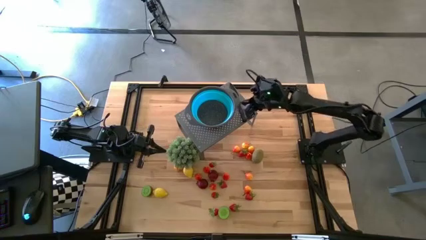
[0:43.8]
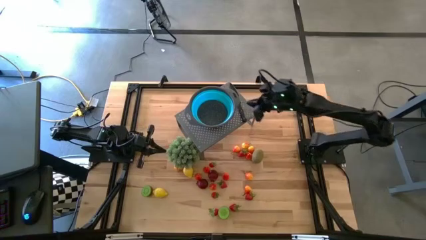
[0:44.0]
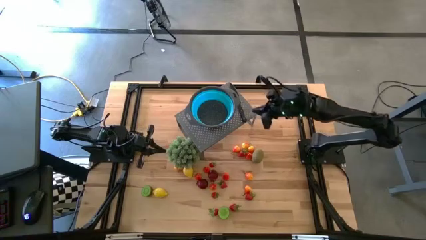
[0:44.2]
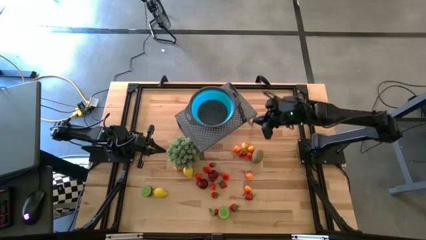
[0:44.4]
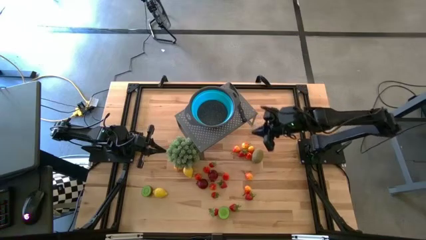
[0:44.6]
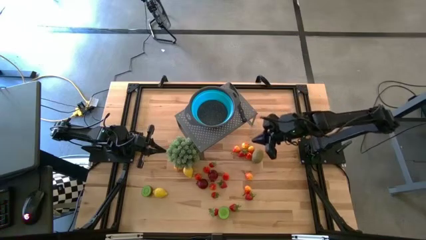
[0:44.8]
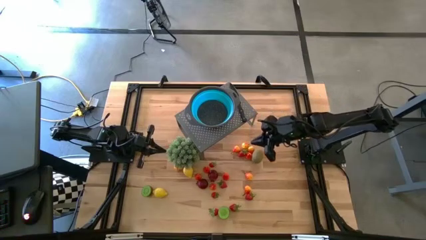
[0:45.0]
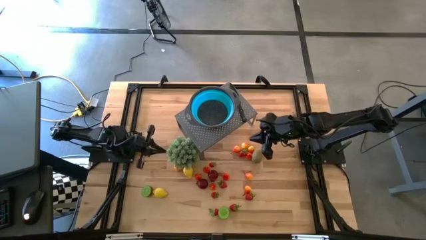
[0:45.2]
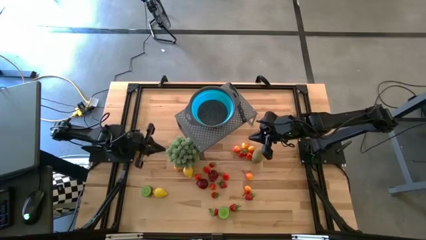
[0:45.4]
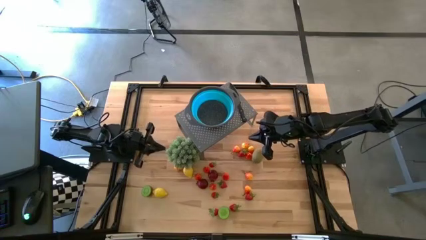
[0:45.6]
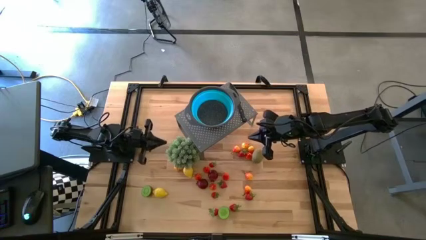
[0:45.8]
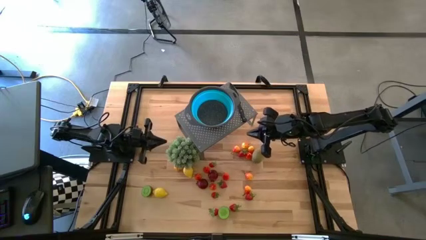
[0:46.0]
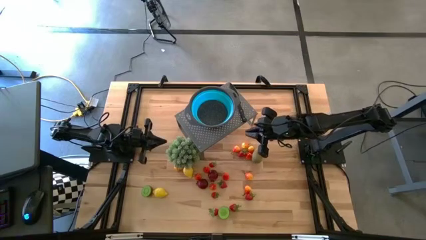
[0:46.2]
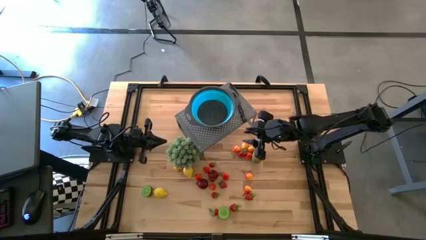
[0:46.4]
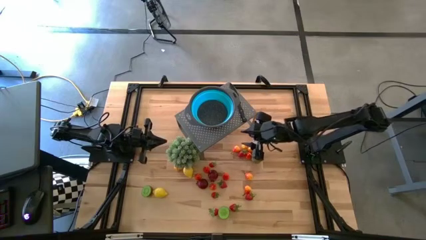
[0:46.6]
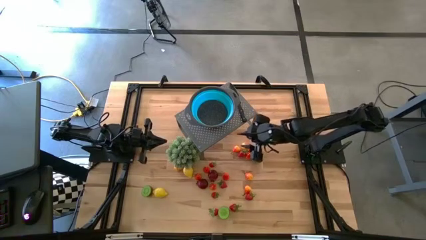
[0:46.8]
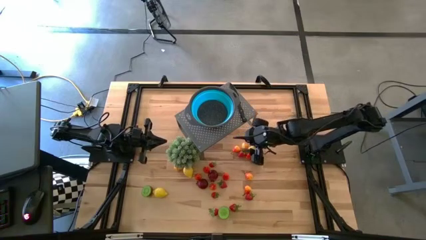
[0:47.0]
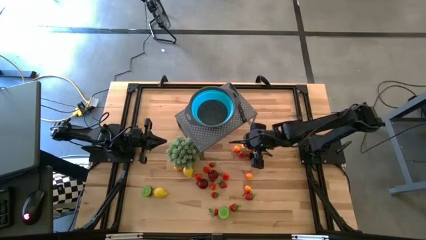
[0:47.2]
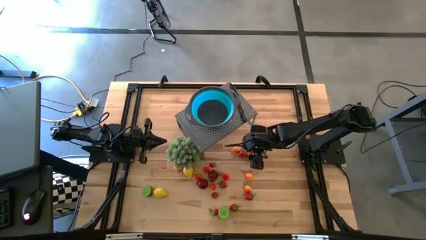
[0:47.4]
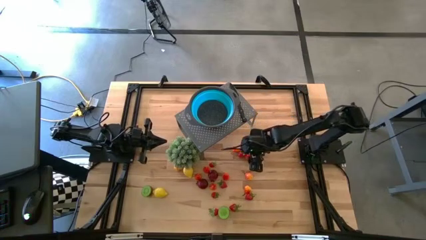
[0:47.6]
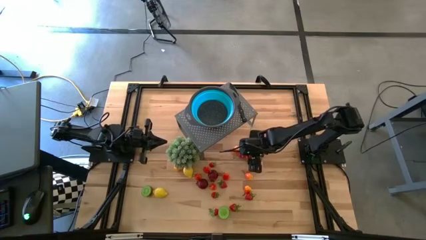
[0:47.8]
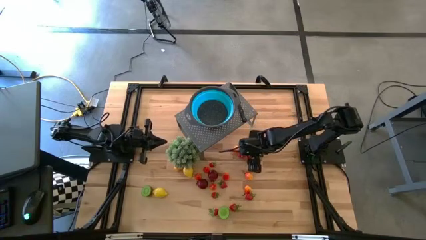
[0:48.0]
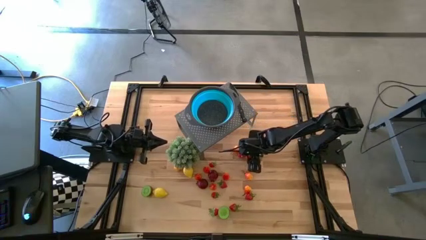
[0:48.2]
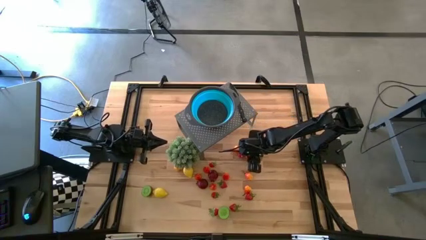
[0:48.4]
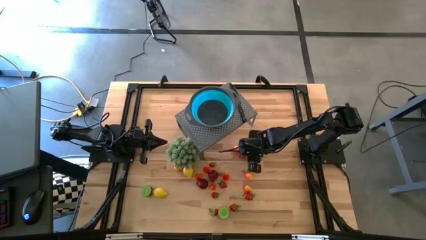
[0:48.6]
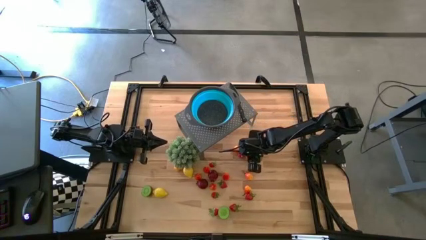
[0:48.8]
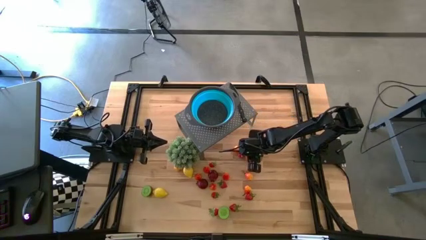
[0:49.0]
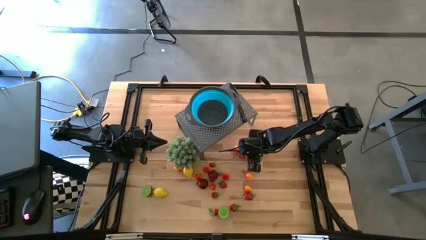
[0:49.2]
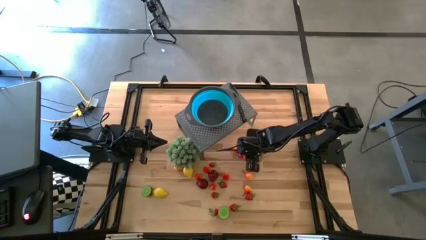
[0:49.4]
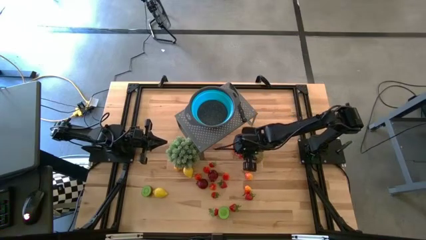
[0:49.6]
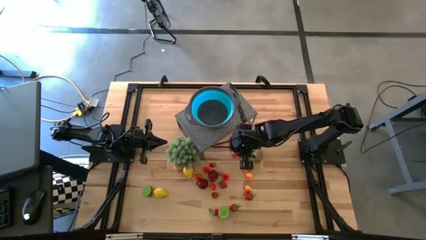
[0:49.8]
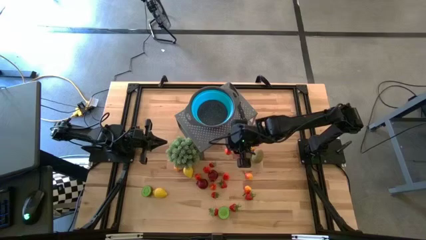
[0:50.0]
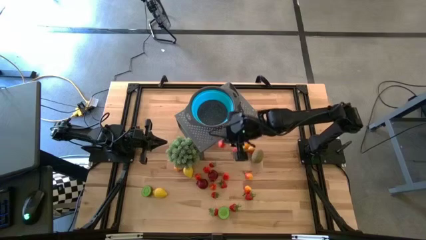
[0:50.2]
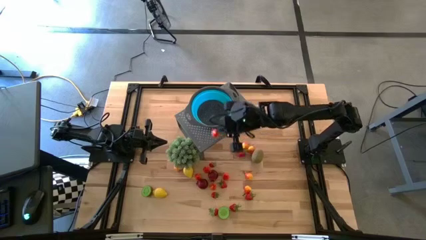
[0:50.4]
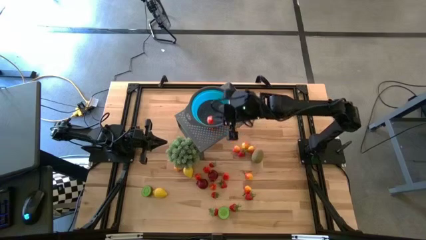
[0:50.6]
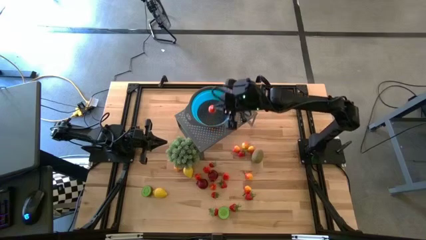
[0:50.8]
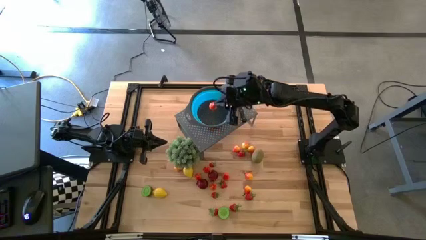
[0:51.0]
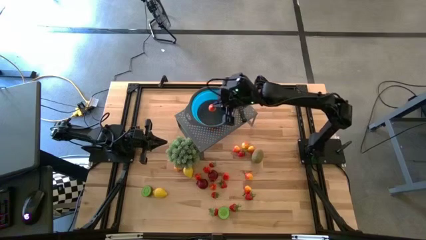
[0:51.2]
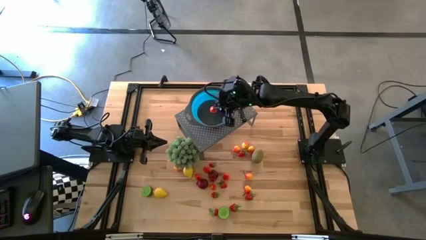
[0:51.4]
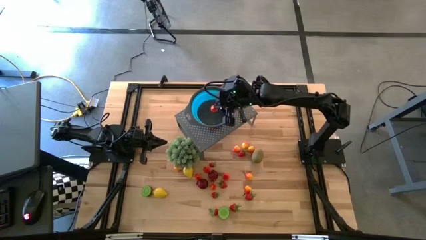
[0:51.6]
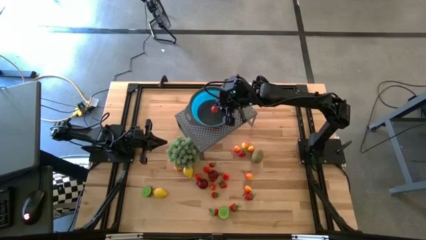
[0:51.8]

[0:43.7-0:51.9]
Task: Pick & Place Fruit
Put the pear into the blue strainer bowl on the shelf
